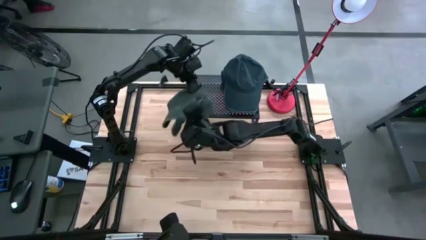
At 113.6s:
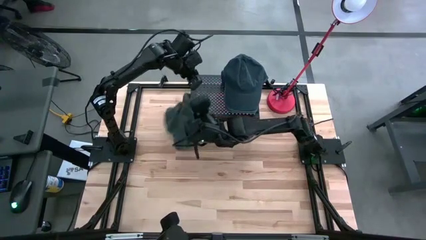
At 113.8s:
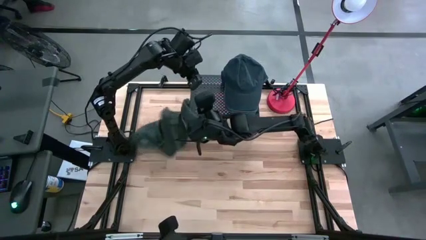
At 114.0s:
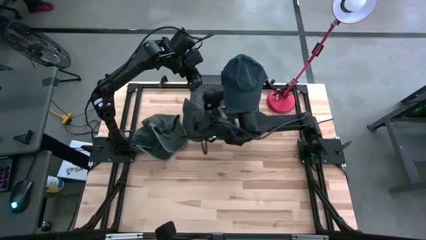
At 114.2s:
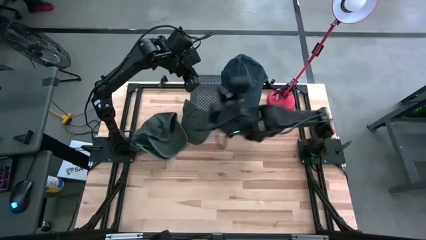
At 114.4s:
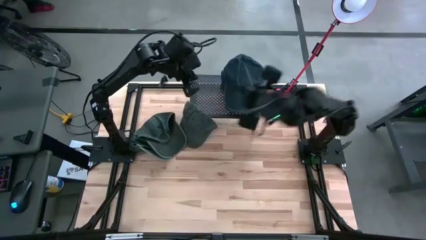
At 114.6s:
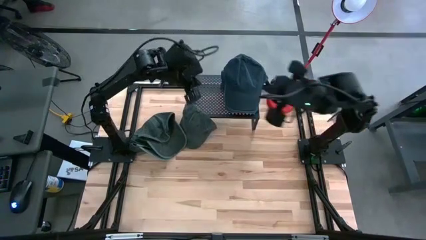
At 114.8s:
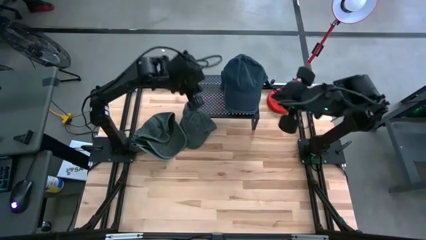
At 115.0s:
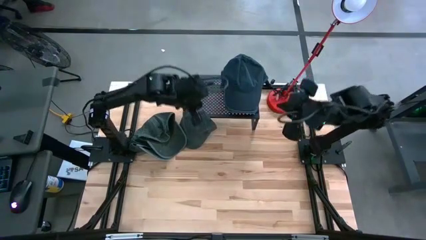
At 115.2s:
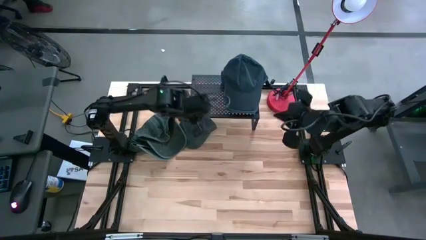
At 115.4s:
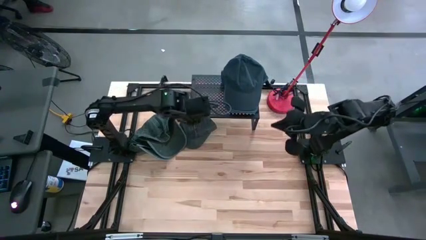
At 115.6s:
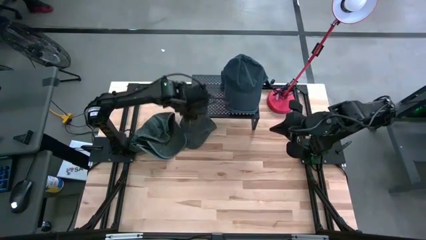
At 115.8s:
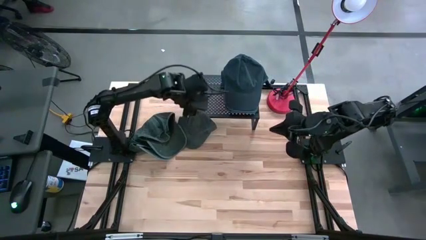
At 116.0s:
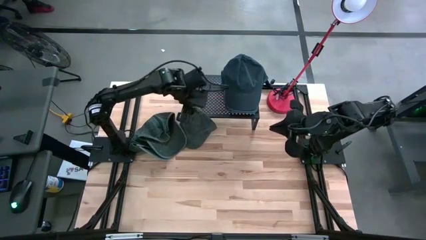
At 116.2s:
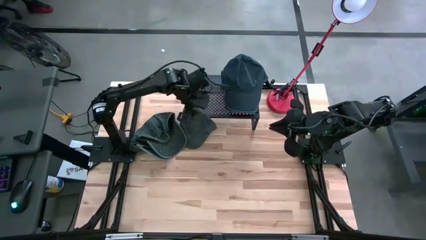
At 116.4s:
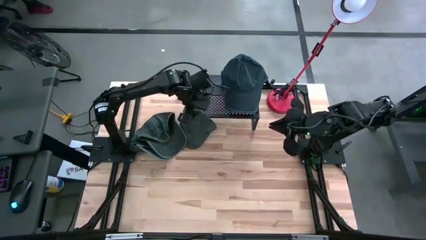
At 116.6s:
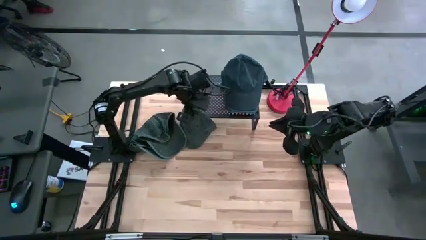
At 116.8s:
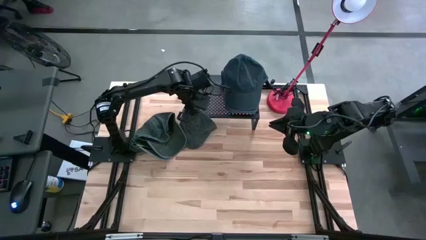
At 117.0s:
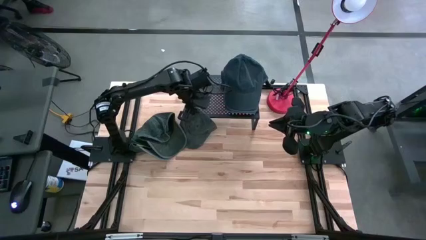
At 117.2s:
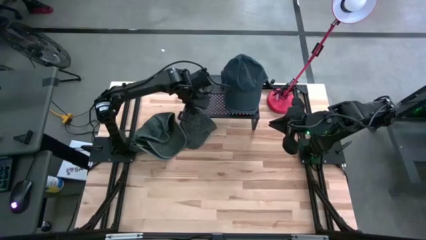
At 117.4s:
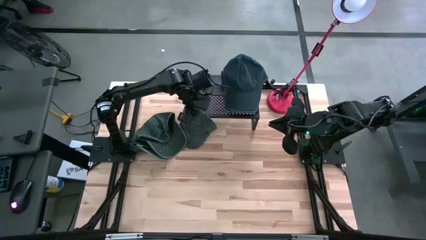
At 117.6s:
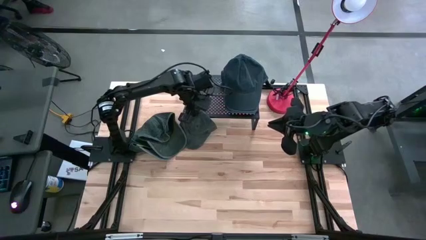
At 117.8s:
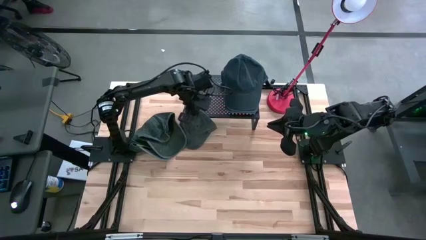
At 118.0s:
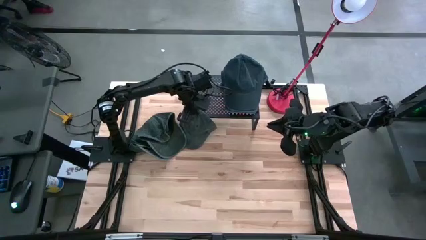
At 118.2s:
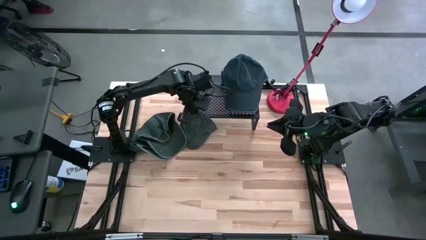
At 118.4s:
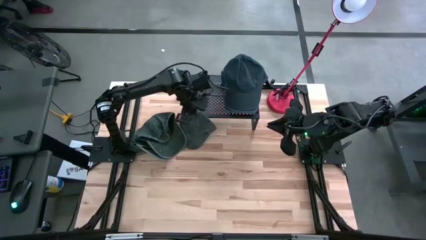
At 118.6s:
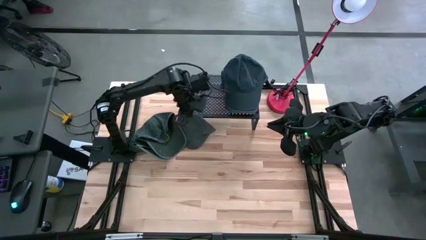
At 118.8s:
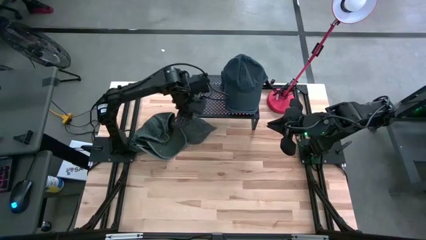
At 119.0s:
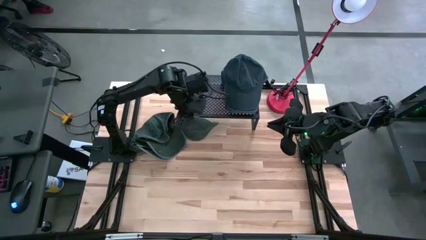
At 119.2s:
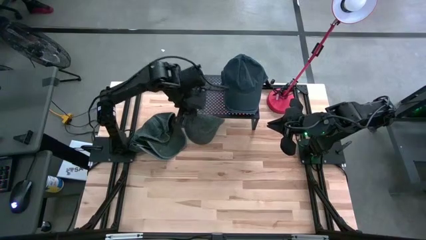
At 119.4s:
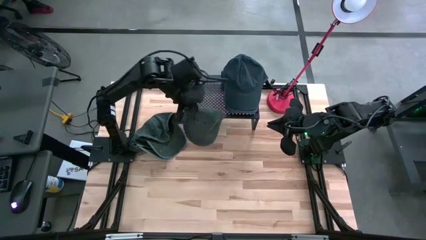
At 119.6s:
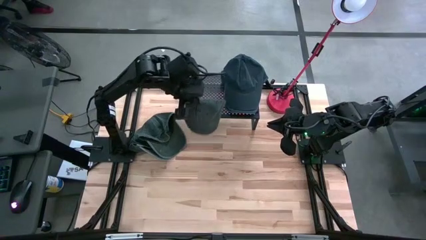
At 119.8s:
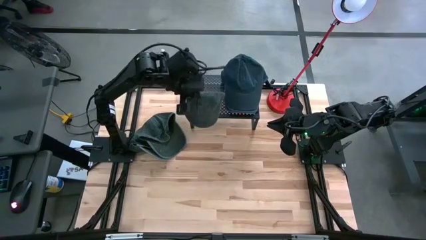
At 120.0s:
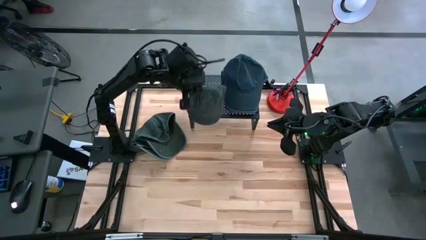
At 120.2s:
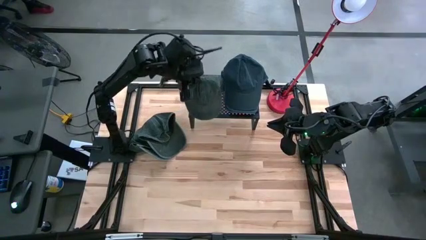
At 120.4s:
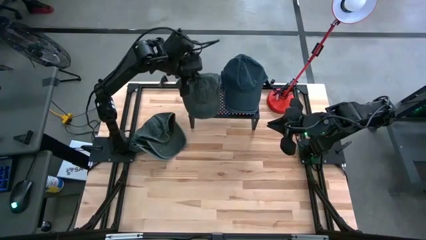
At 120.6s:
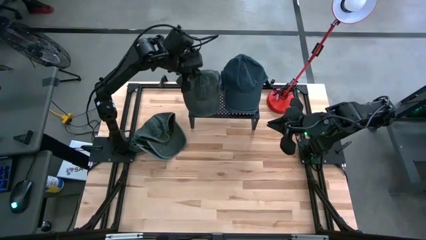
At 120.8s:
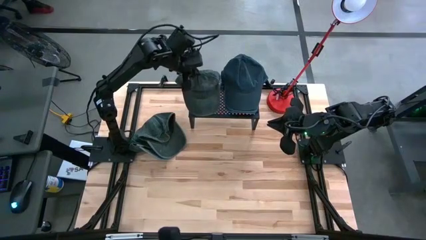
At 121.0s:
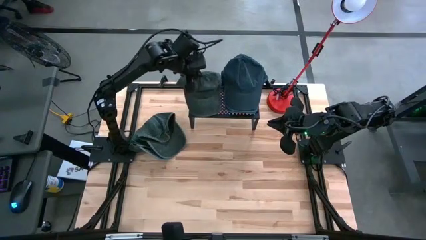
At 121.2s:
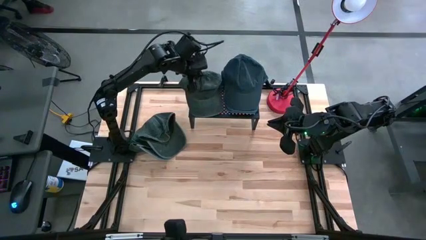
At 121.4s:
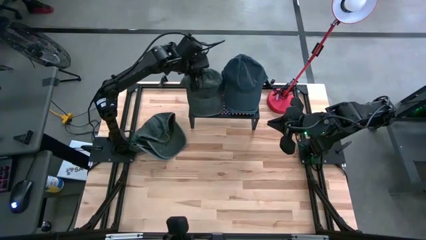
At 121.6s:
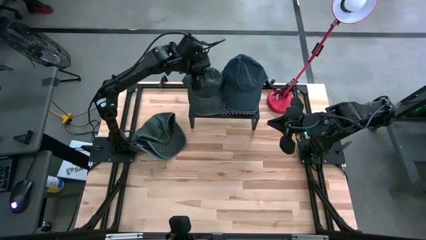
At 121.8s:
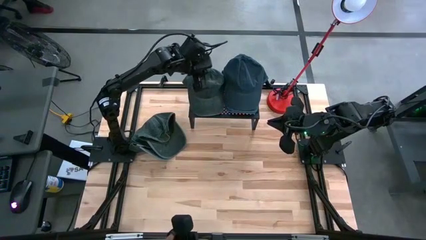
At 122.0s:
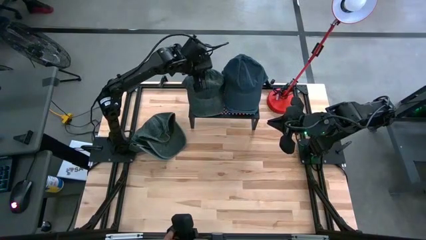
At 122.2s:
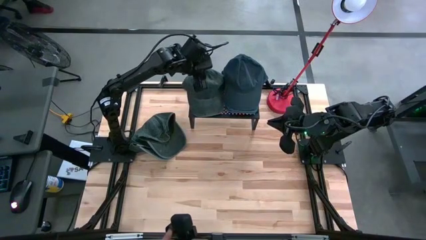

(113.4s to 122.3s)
Task: Pick & Place hat
Put the right dark green cap on the shelf

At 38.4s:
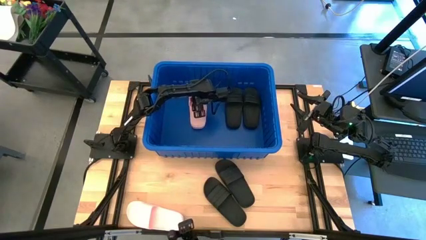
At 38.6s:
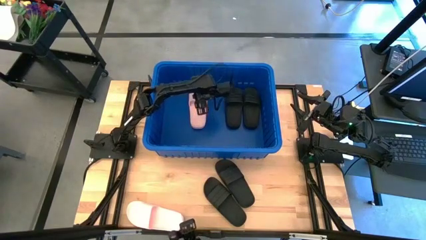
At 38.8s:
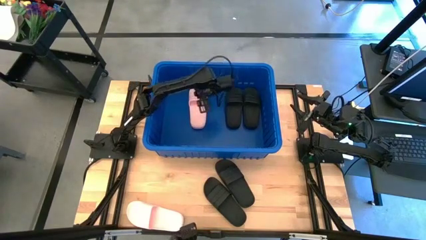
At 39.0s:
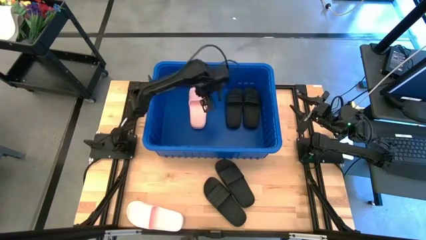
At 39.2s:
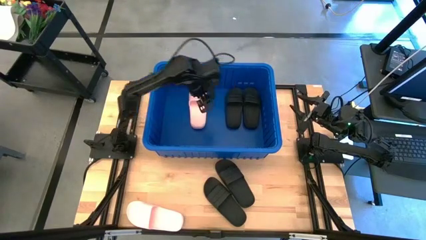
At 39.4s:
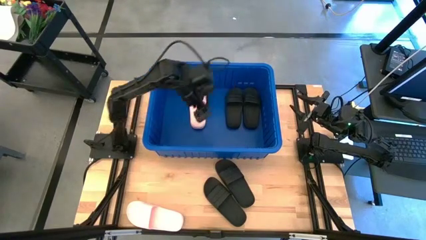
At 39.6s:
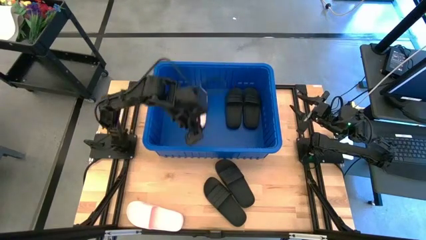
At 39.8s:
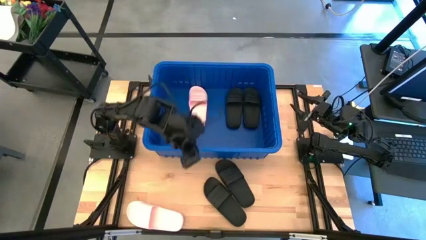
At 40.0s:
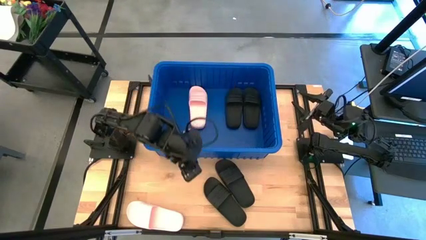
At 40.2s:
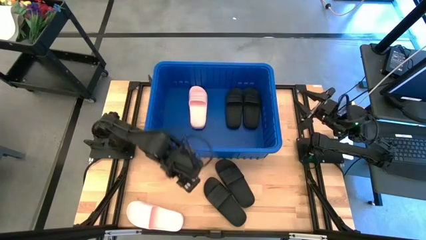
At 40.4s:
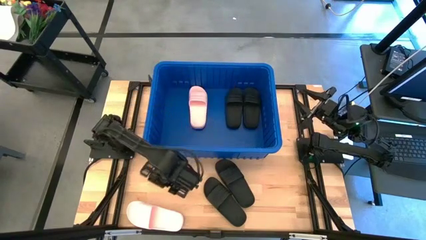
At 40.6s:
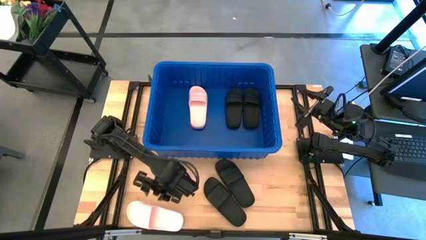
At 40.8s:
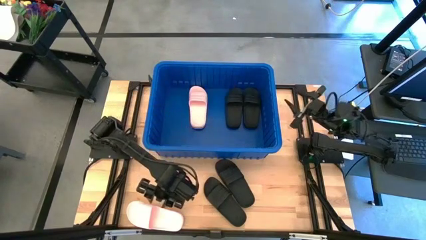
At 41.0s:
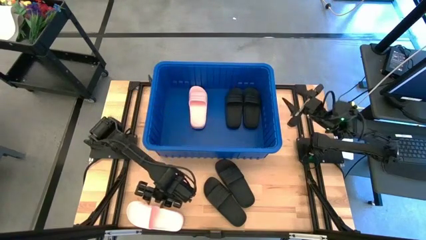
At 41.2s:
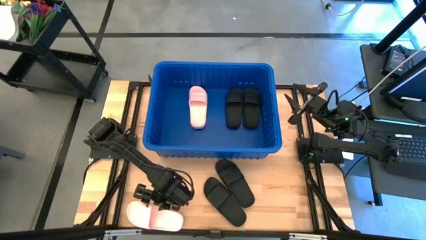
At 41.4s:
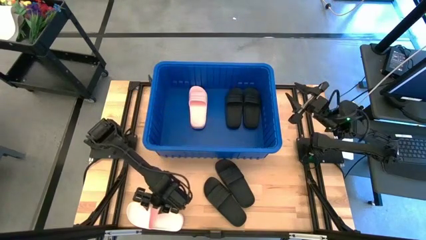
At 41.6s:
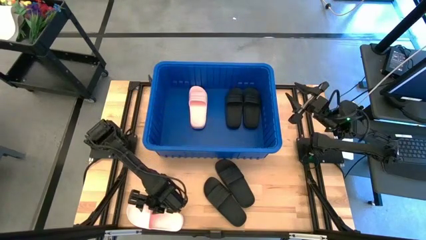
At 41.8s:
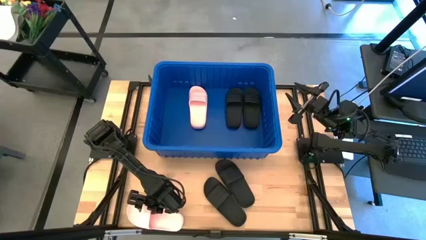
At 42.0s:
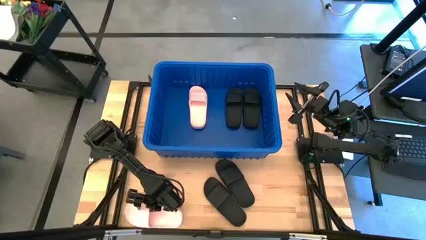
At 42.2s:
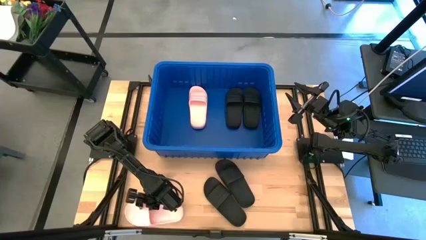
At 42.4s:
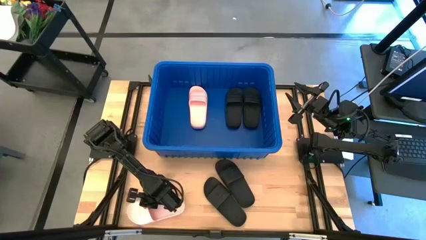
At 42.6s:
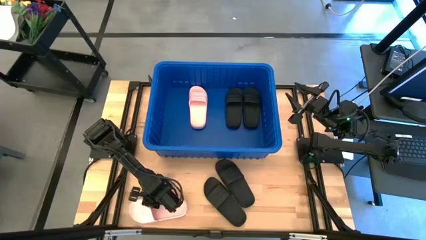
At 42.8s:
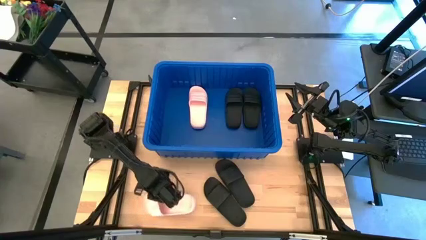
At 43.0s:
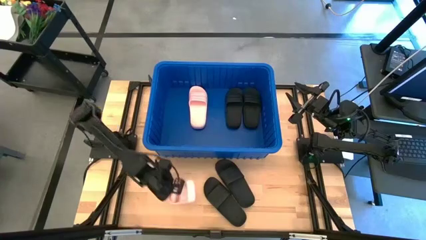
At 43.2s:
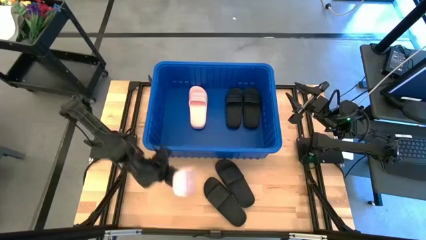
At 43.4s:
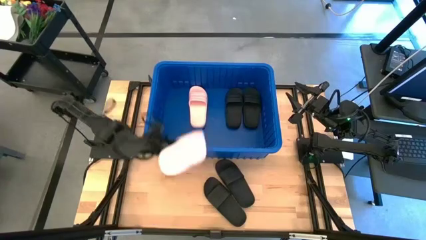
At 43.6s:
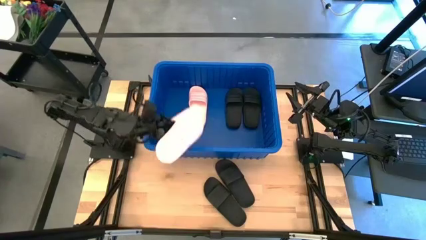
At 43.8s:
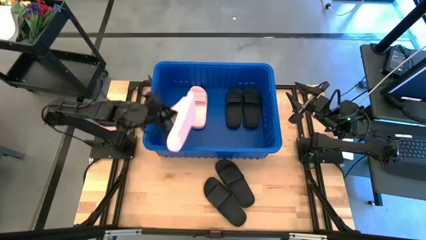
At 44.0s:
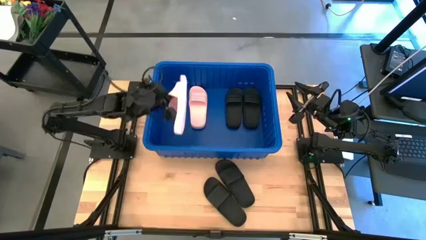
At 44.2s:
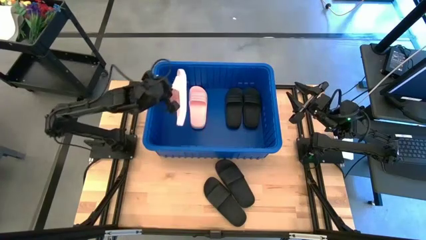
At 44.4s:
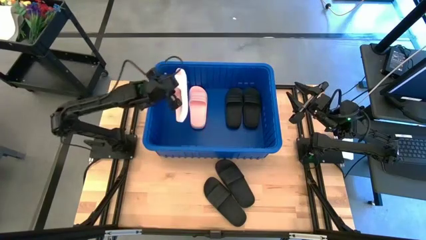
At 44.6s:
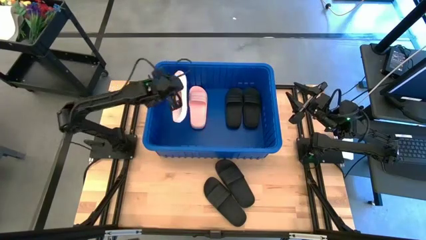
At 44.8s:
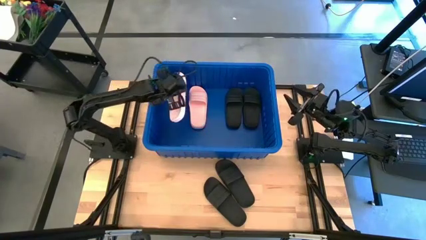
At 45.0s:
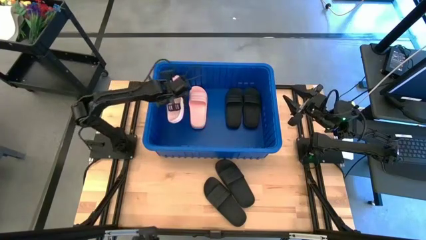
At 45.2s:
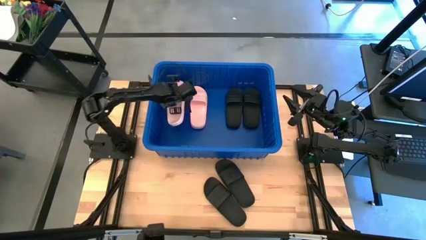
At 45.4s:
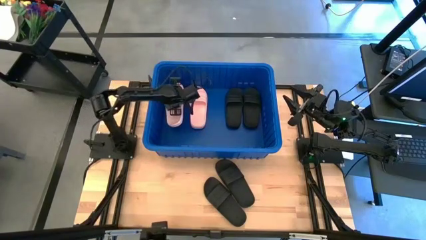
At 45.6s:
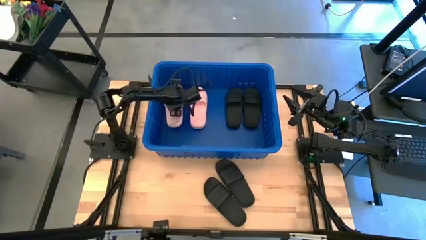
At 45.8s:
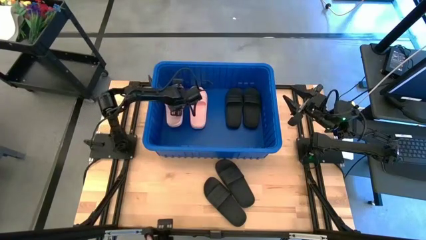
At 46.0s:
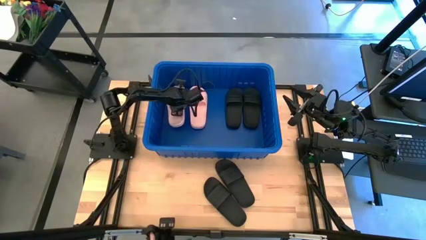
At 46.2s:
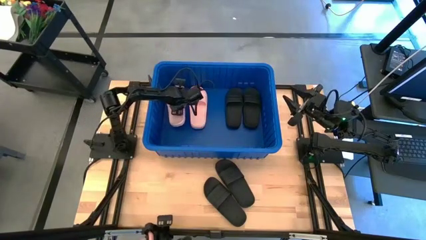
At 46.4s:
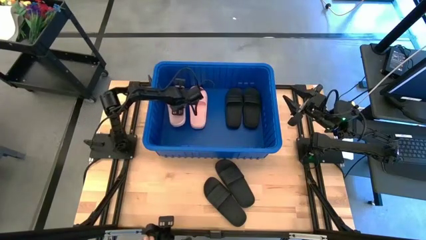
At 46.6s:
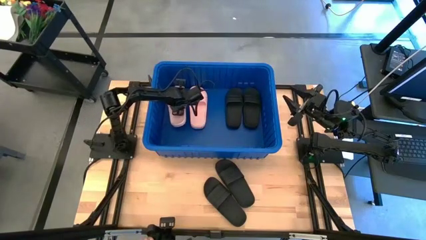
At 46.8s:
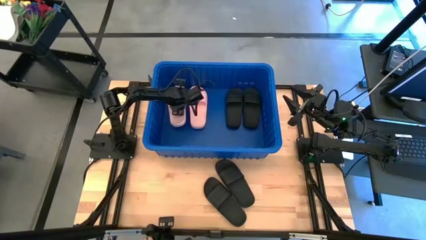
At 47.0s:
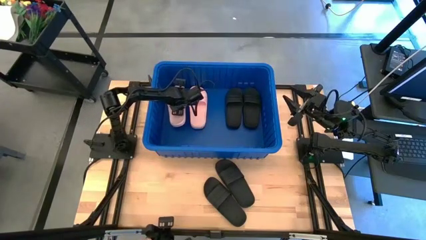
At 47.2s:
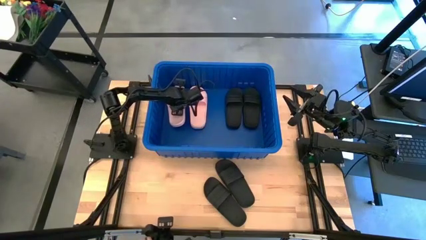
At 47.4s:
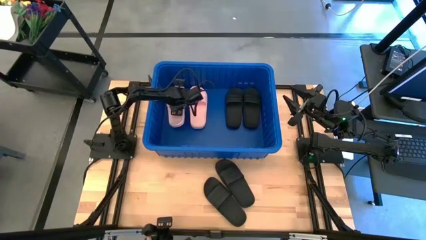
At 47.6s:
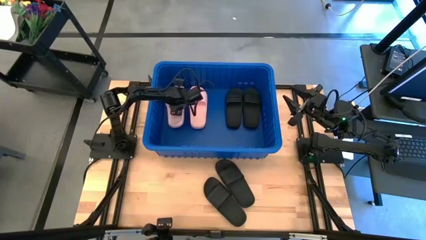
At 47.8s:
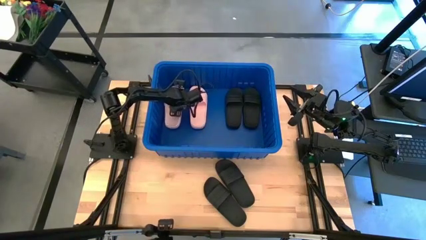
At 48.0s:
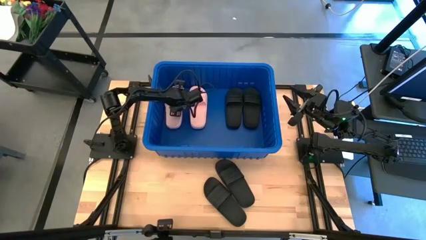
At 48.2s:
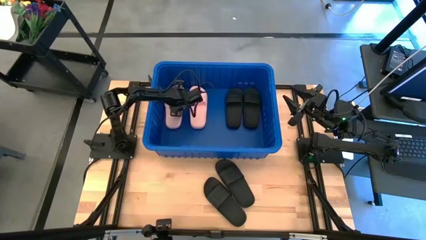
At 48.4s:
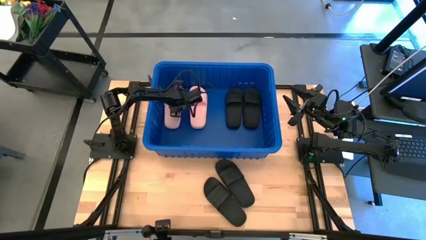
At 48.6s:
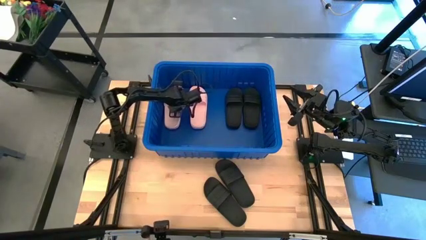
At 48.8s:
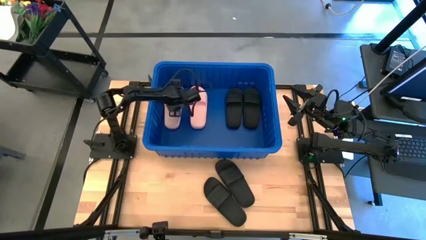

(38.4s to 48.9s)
Task: Pick and place slides into bin
Put the pink slide into the blue container
